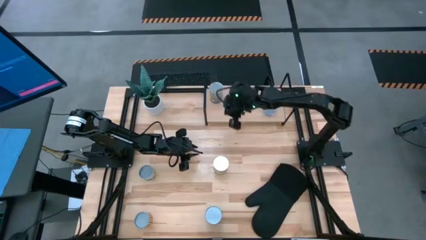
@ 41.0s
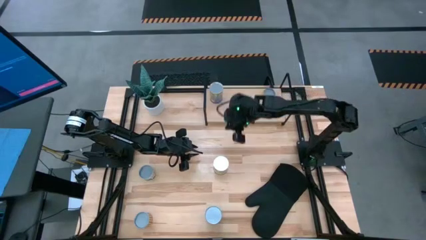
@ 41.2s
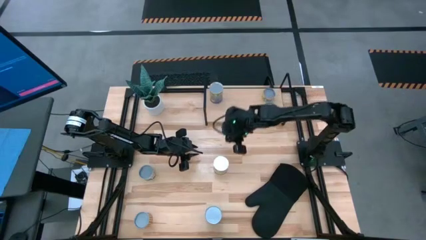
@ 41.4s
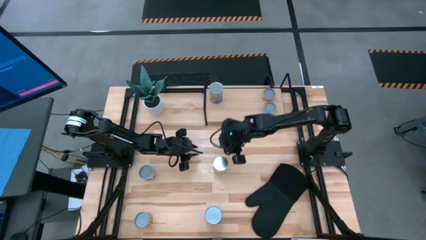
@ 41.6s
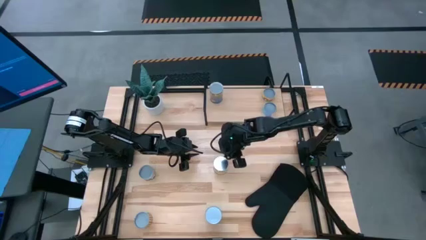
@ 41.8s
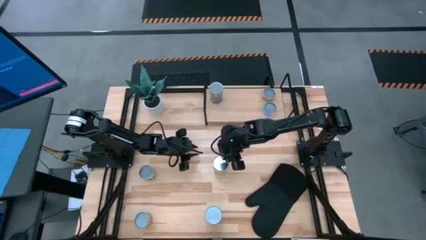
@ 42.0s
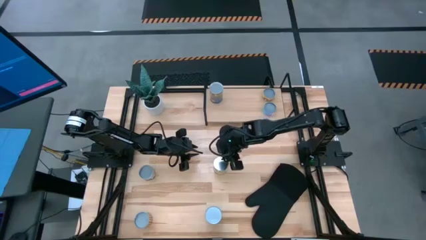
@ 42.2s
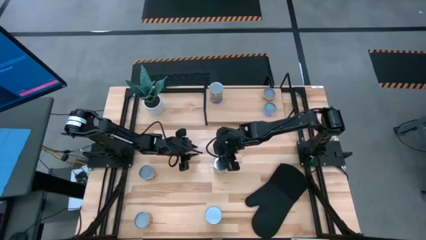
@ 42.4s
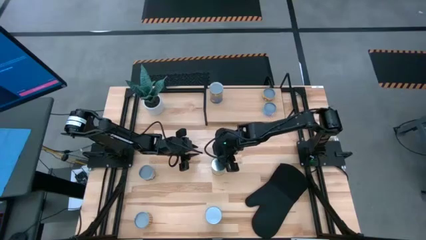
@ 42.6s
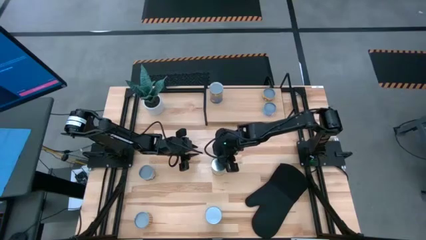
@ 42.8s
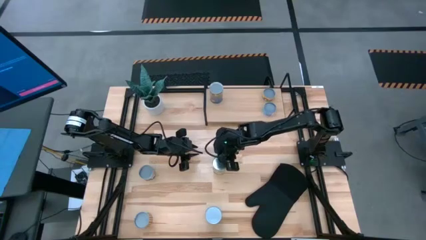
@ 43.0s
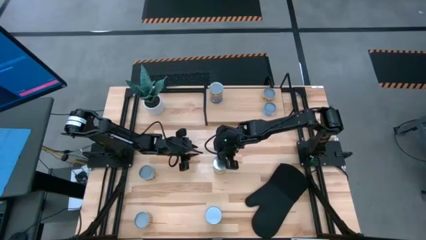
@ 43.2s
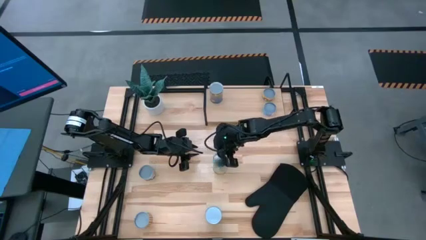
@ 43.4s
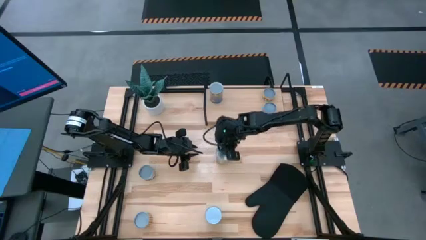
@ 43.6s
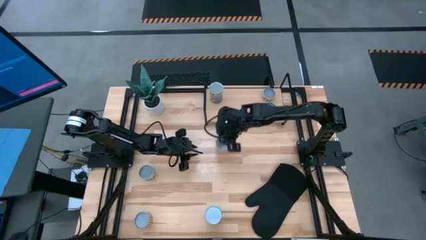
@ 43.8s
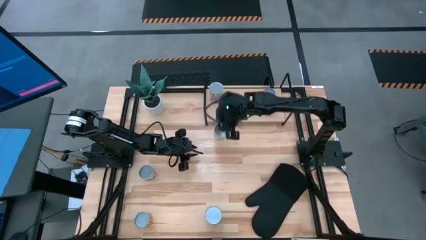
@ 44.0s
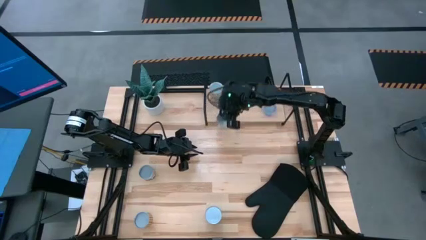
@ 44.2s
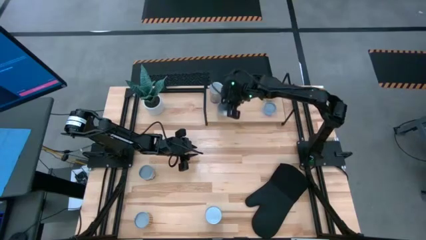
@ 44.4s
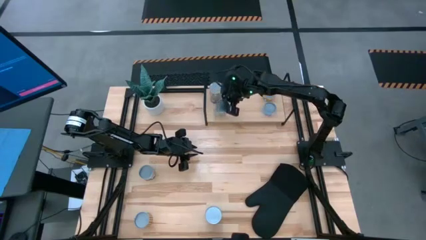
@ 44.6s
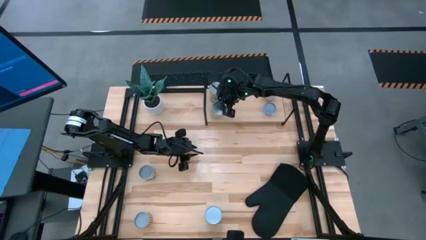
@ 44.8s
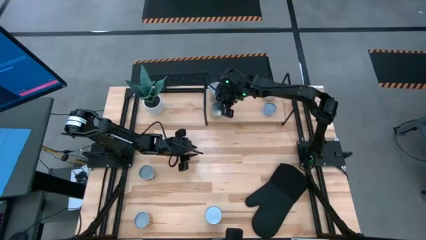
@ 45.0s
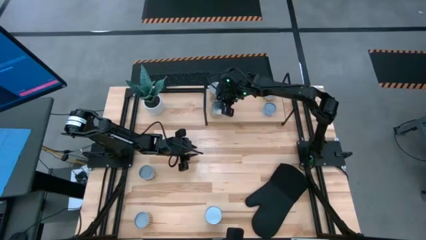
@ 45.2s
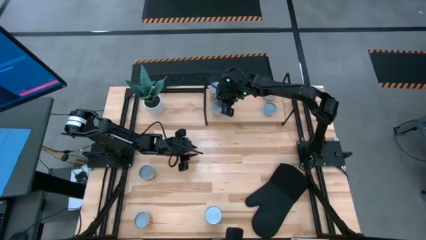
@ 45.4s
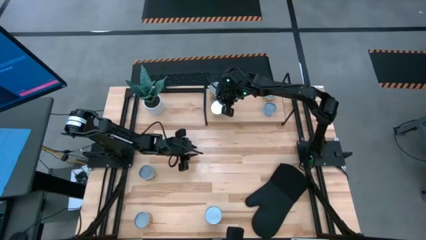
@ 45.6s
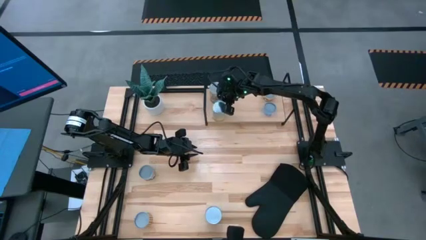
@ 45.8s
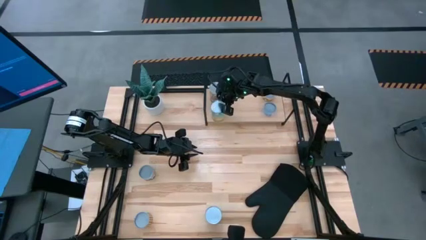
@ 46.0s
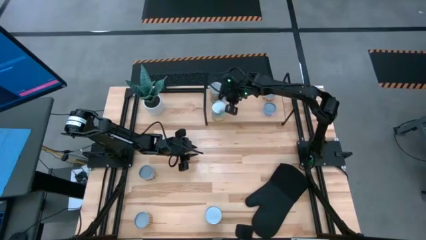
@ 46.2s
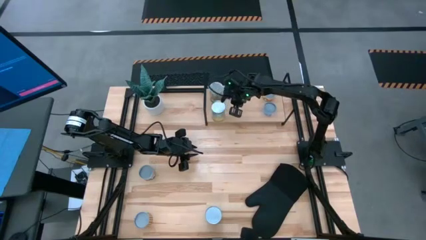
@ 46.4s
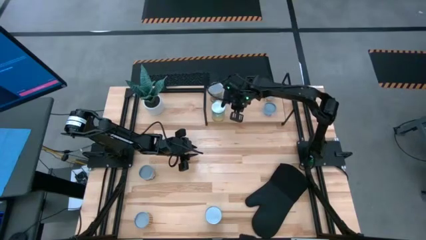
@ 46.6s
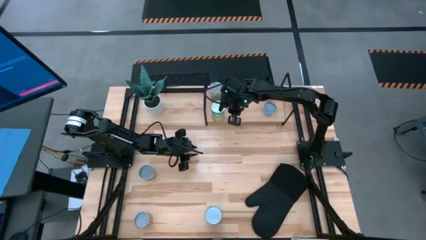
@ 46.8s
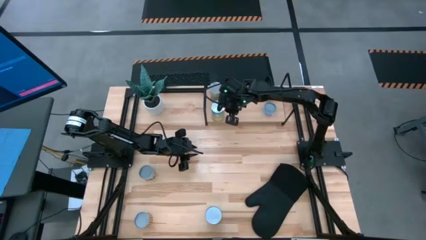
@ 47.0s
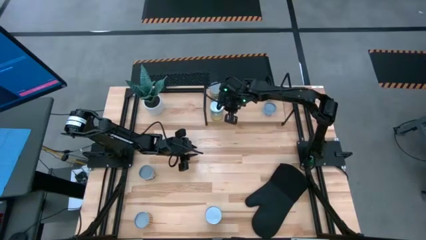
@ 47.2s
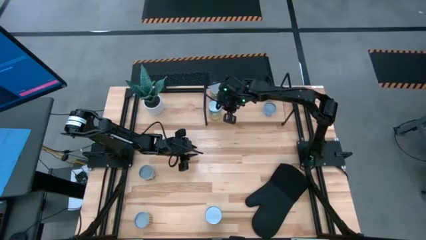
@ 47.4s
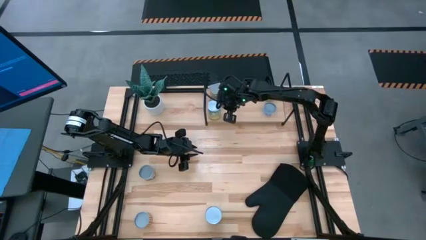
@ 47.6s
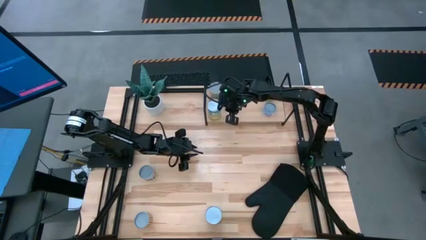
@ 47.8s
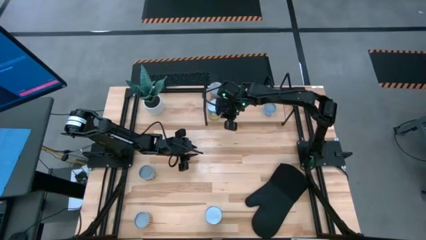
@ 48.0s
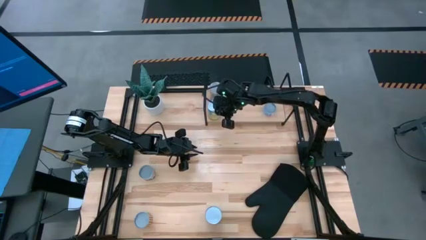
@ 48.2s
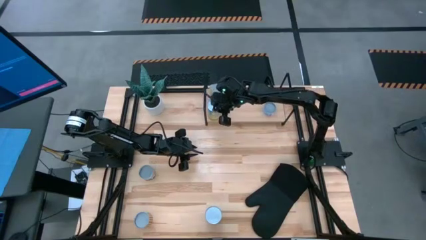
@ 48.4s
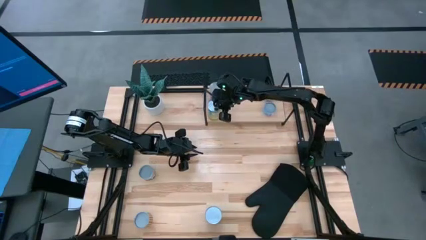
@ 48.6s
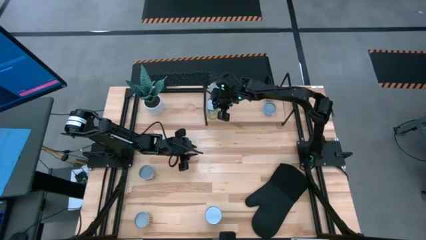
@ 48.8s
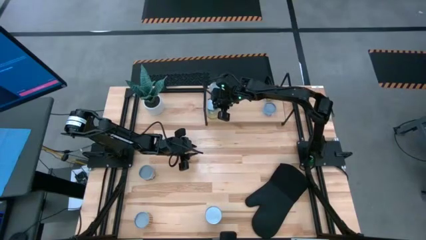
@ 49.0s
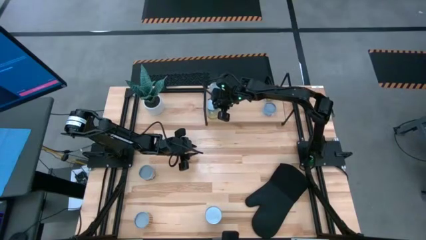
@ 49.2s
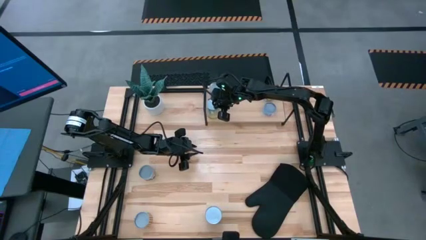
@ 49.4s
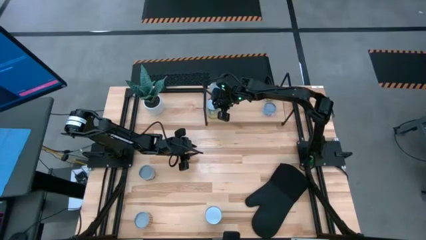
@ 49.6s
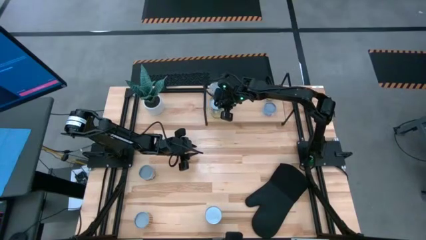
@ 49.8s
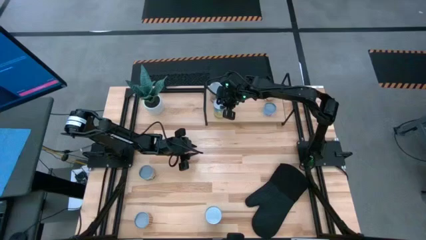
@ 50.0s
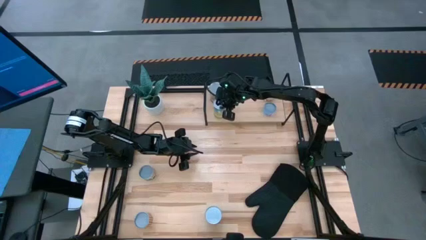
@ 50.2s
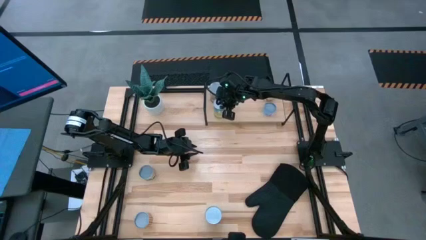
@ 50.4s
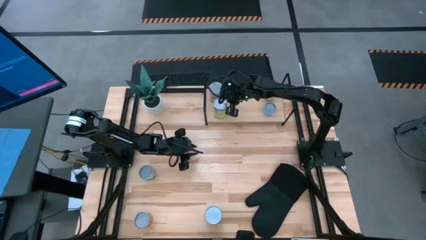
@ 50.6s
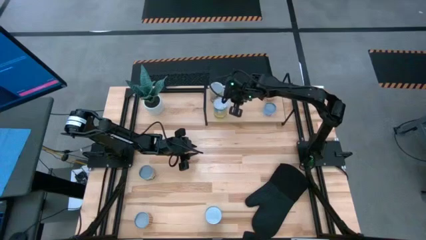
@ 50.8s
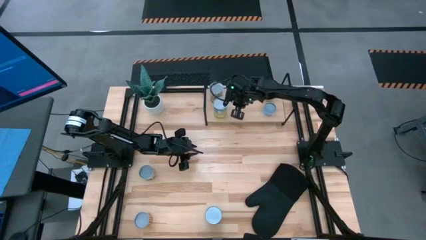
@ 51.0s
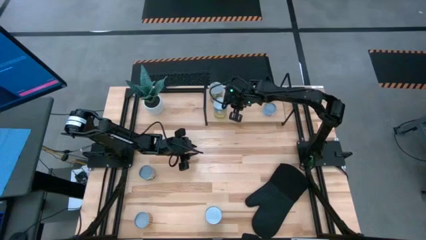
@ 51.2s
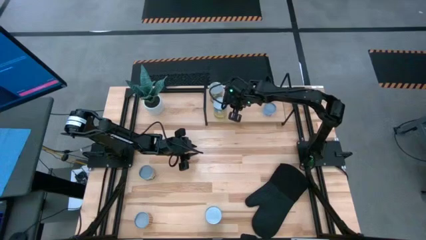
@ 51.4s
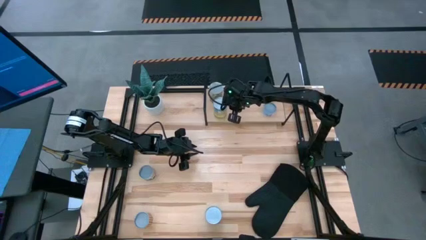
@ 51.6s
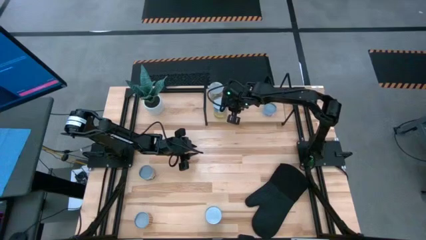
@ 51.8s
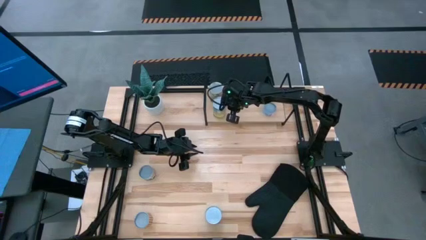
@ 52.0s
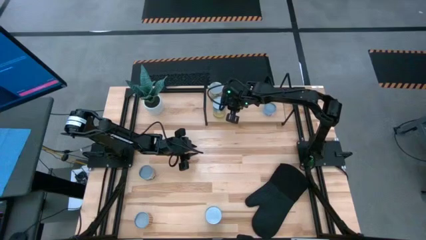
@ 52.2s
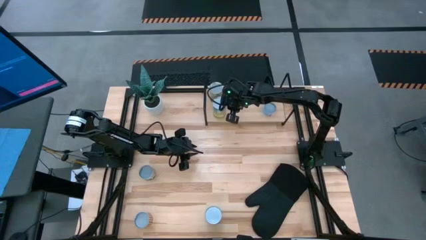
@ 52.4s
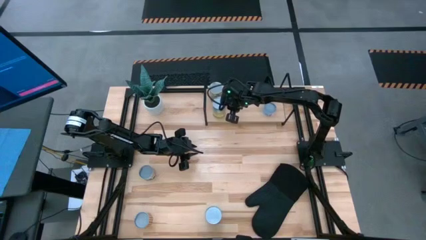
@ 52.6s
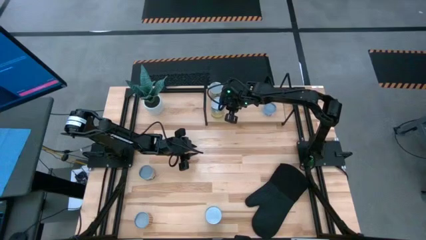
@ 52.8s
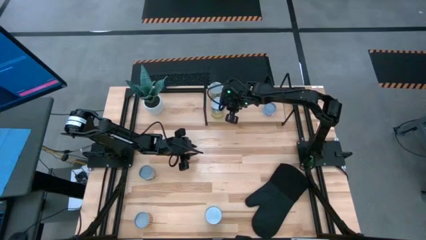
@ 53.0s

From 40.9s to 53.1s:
Task: Pick and place cans onto a shelf
Put the canned corn on the shelf

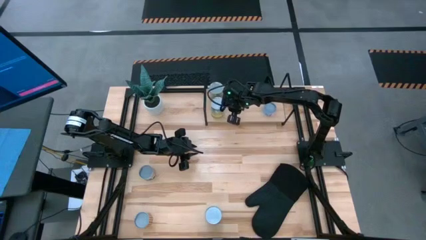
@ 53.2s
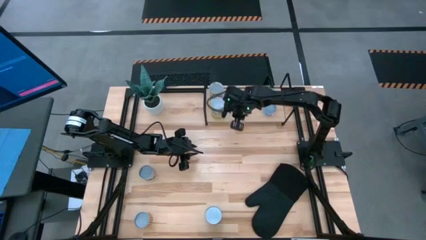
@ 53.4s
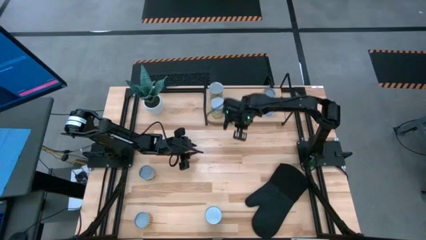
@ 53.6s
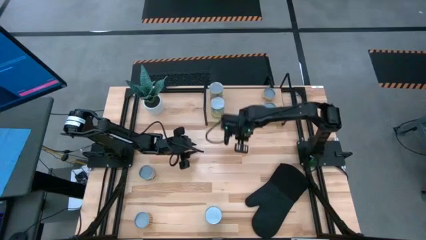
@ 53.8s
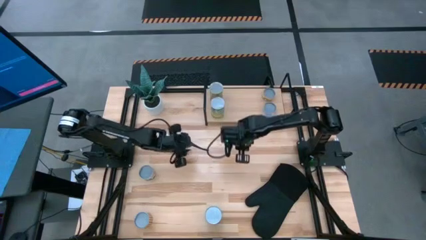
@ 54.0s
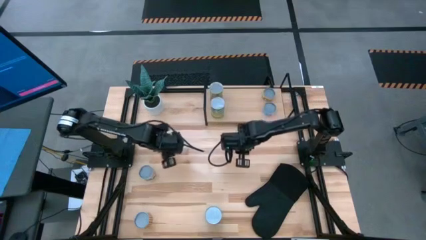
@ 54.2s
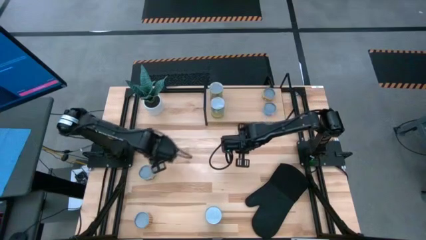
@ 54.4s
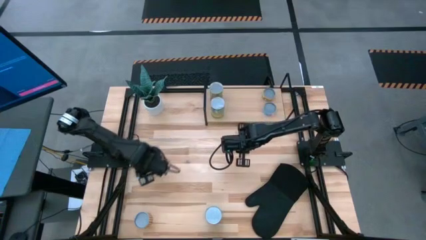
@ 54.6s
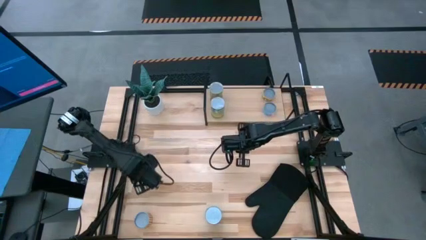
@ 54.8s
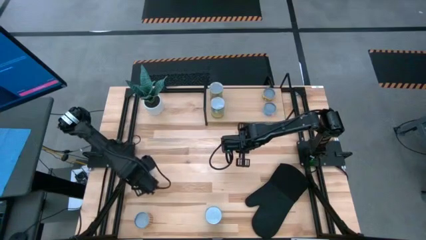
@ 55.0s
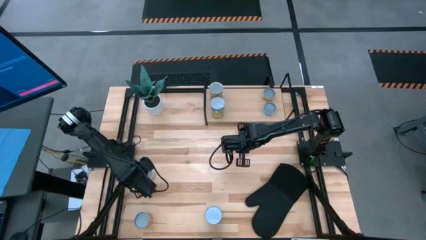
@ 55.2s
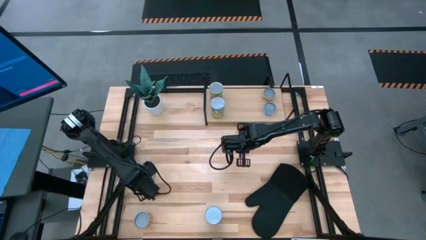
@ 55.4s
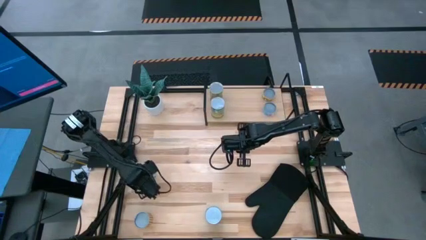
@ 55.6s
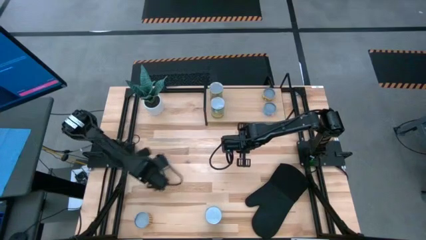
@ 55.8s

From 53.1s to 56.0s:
Move the canned green peas to the middle left of the table

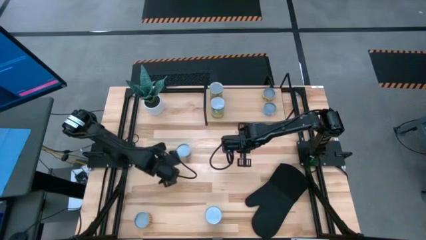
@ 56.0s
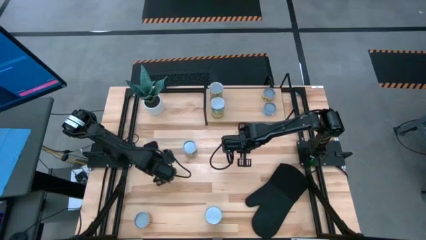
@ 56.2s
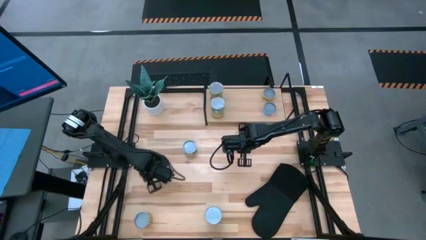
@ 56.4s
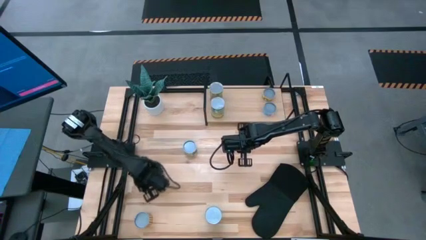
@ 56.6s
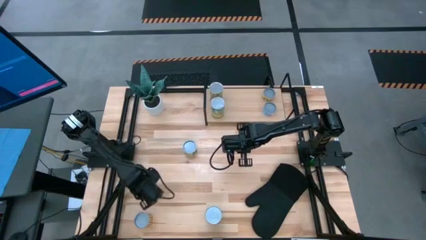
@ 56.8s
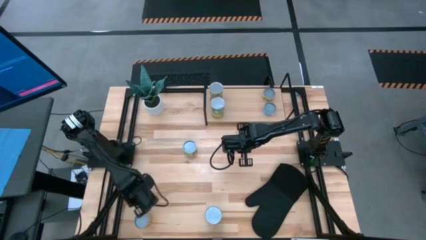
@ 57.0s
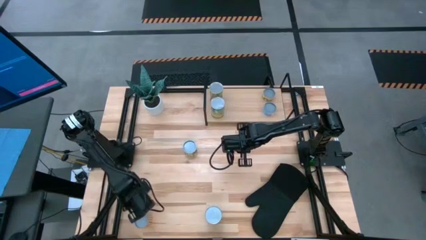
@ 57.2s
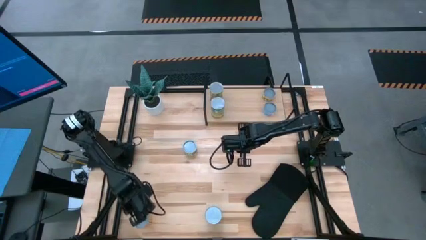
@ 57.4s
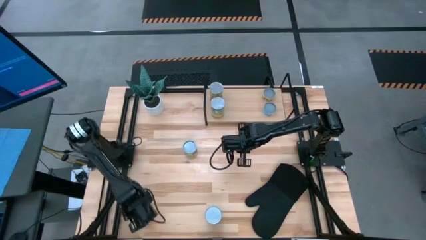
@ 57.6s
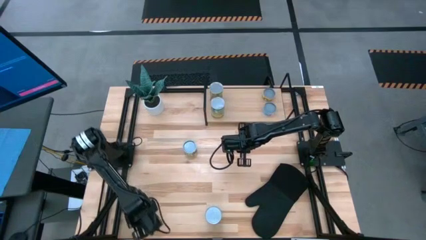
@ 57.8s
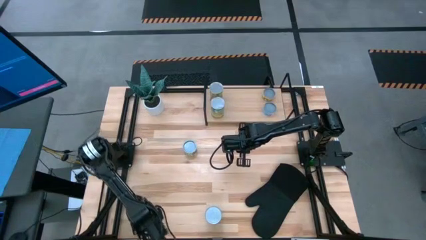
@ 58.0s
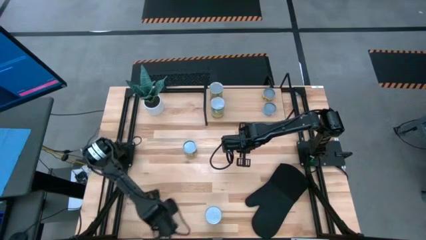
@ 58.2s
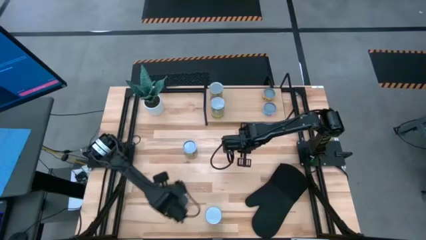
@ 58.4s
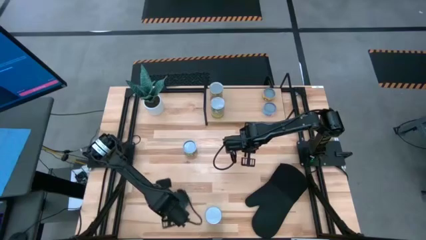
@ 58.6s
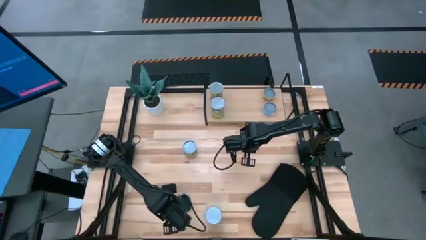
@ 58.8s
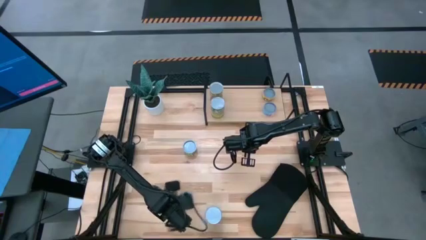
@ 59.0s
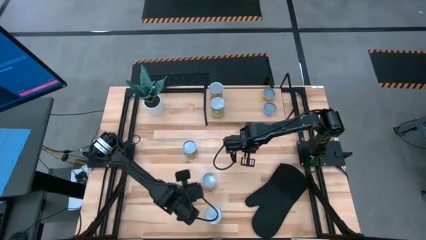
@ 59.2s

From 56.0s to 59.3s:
Move the canned black beans to the center of the table

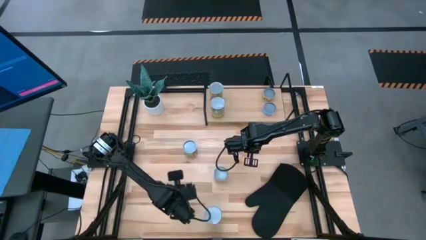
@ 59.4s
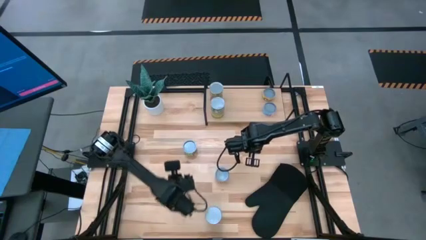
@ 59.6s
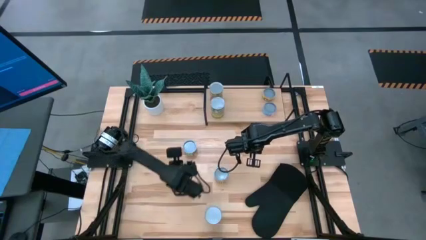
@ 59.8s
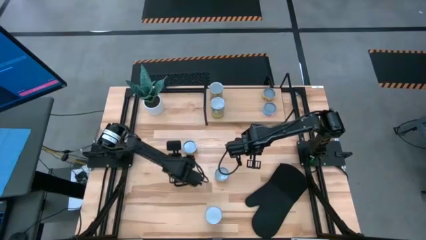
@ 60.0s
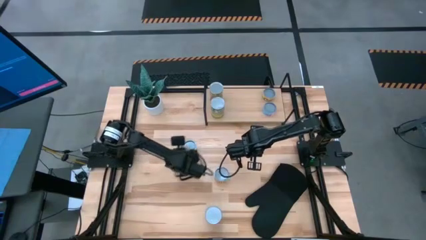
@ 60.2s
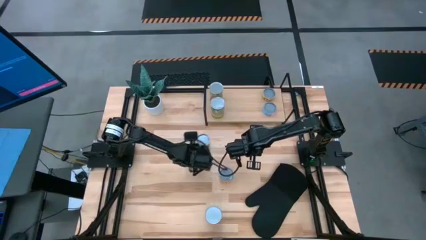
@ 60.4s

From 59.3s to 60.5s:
Adjust the canned green peas in the table
